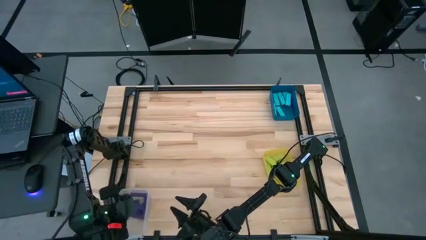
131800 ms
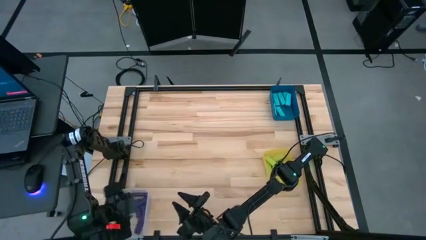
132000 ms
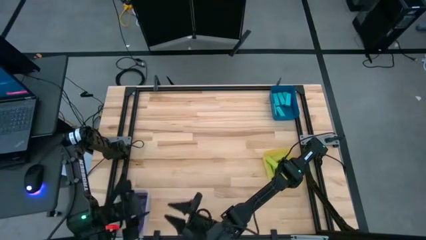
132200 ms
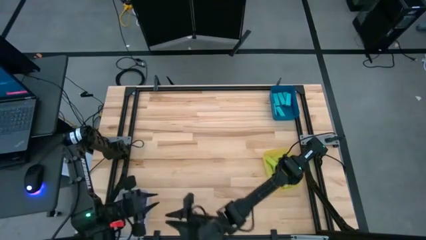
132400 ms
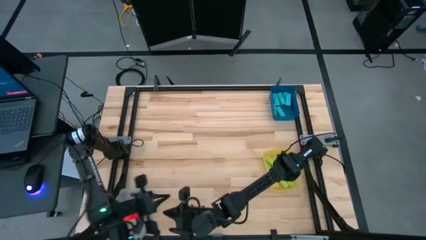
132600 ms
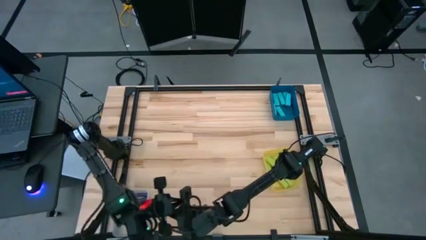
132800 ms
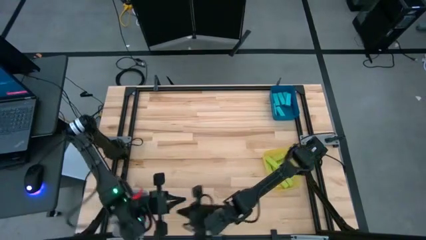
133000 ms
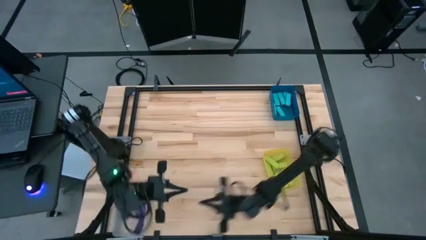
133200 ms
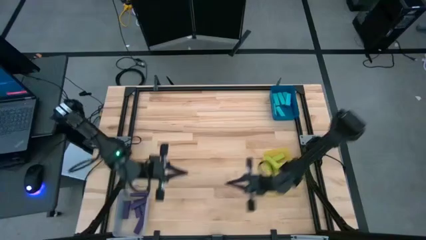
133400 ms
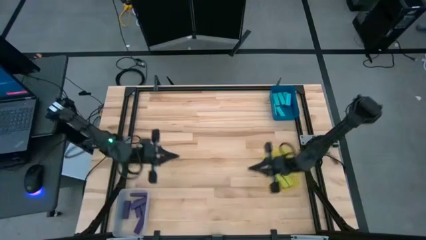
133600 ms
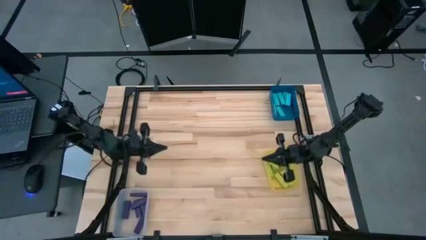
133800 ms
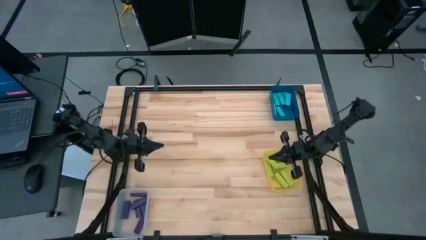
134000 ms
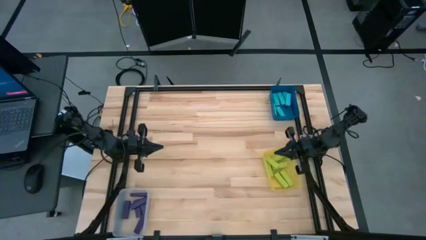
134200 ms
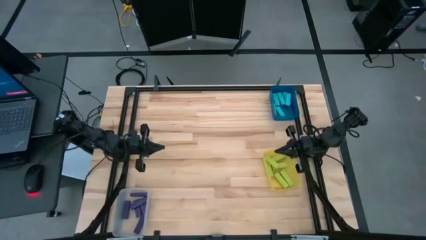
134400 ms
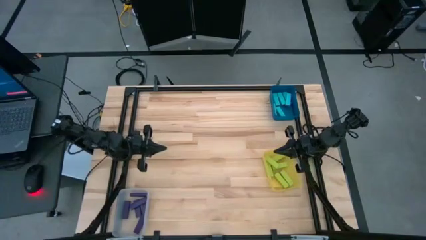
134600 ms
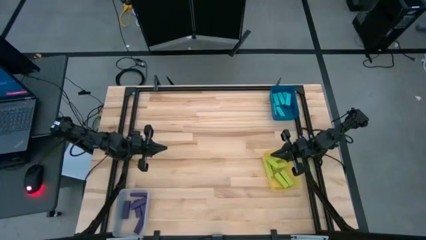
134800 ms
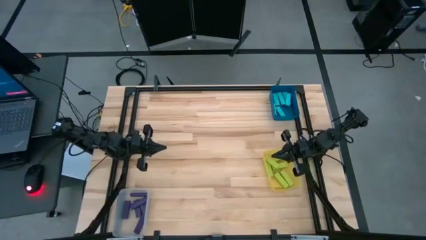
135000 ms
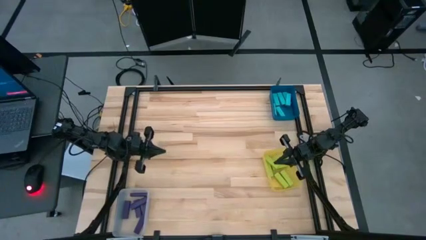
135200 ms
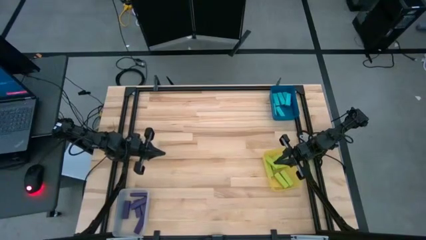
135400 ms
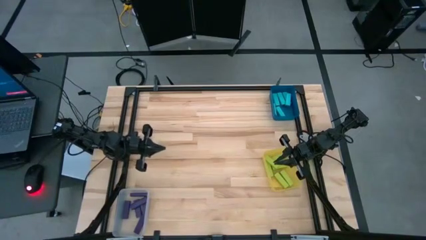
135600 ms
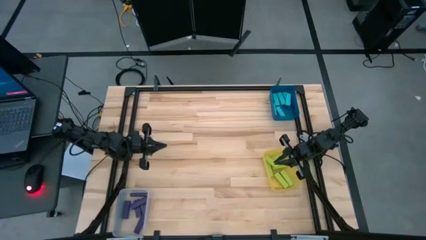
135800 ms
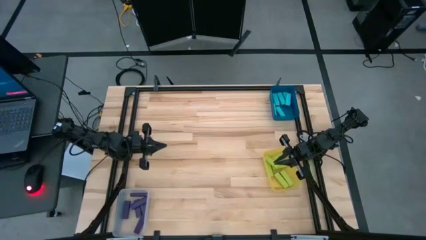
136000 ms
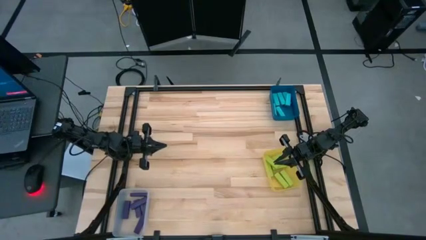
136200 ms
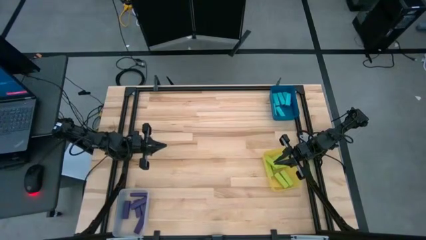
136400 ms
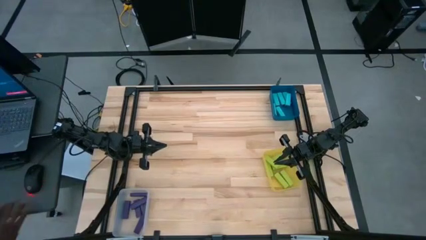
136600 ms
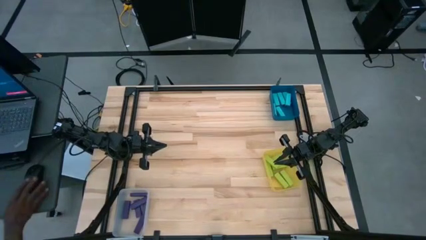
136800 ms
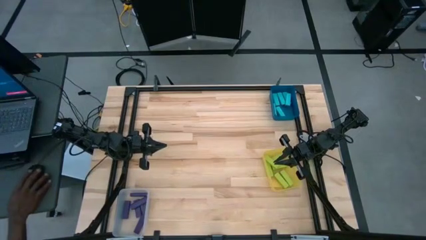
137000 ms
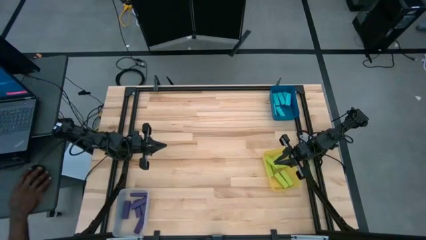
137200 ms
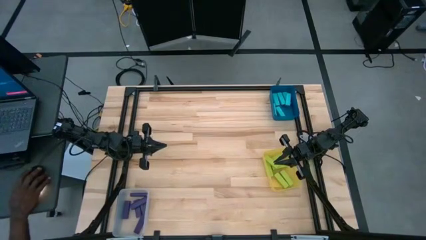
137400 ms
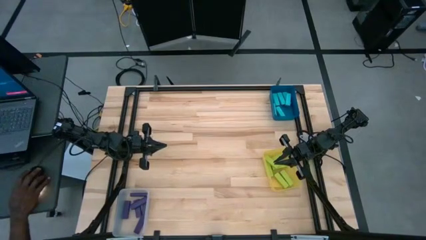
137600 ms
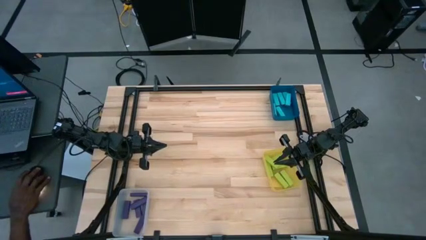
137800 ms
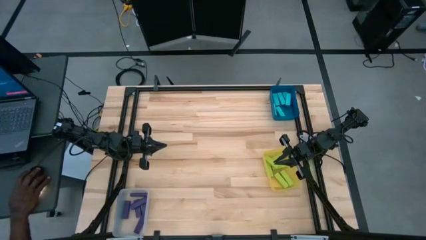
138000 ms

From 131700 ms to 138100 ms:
Task: Sort blocks
Return to Home Position

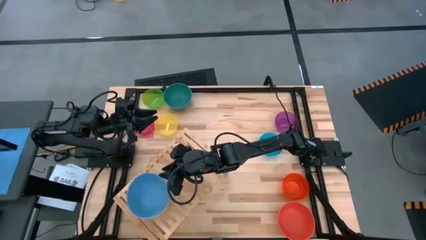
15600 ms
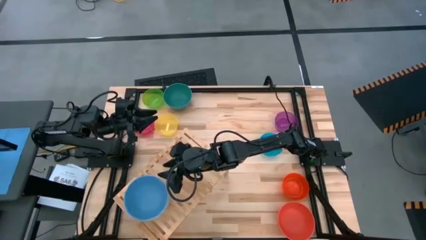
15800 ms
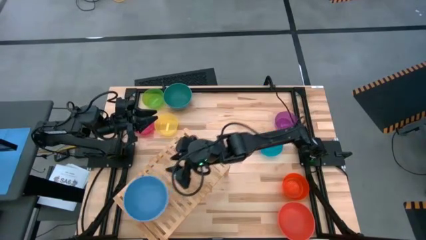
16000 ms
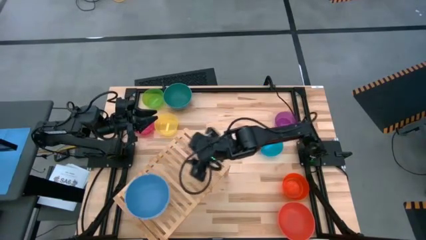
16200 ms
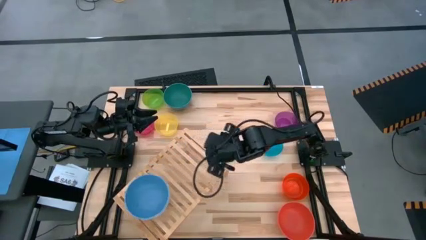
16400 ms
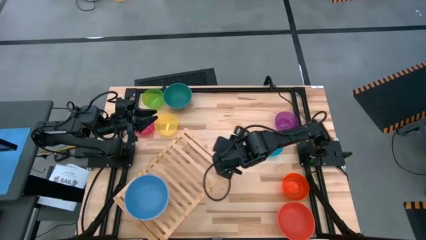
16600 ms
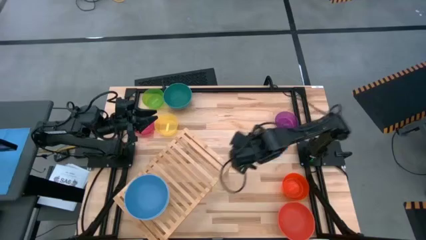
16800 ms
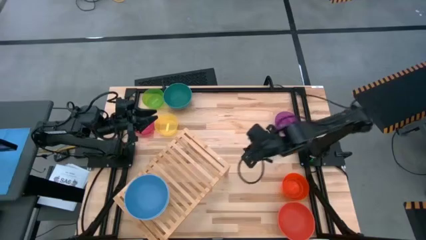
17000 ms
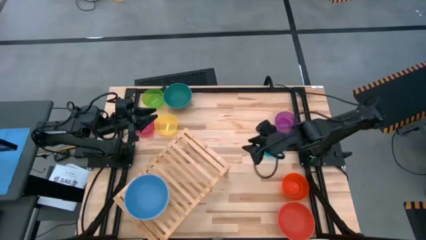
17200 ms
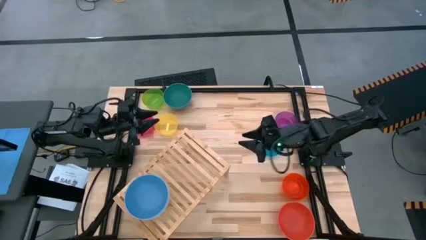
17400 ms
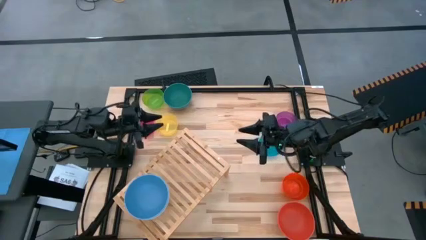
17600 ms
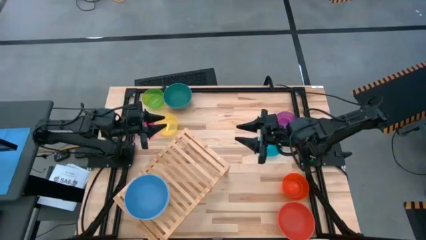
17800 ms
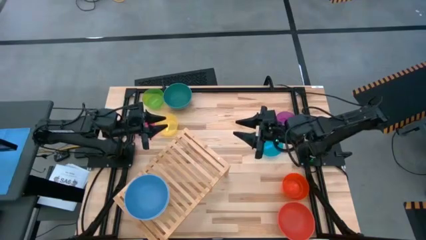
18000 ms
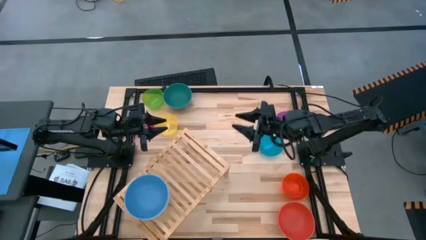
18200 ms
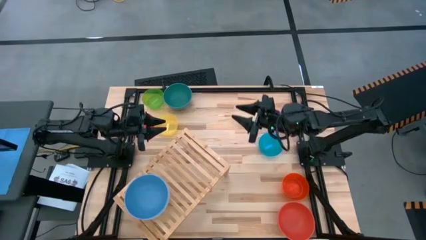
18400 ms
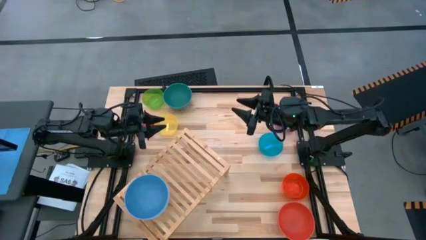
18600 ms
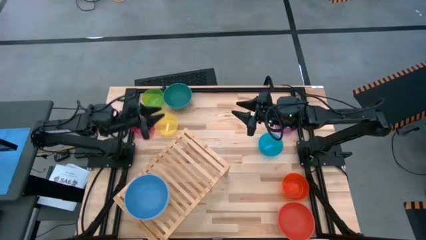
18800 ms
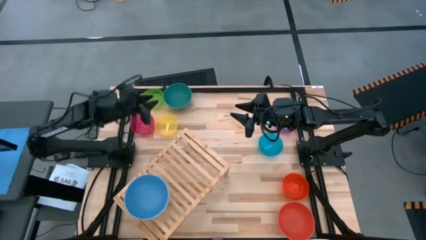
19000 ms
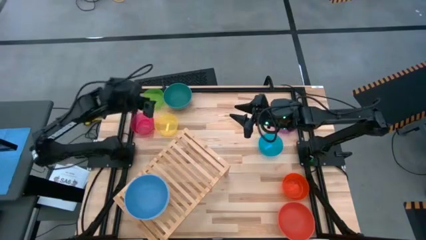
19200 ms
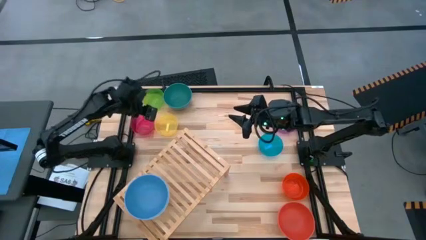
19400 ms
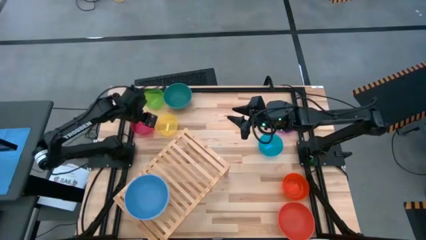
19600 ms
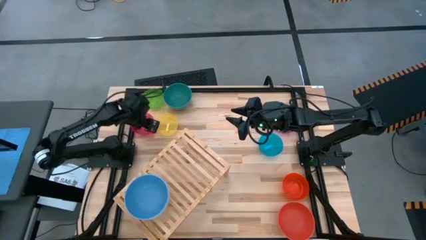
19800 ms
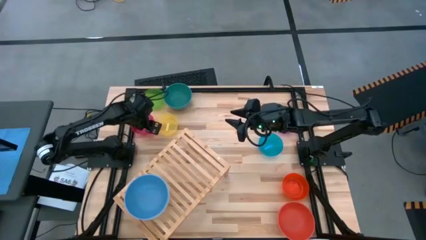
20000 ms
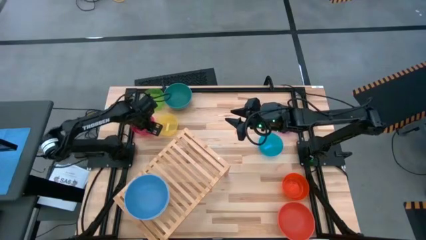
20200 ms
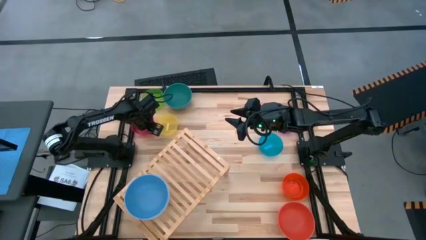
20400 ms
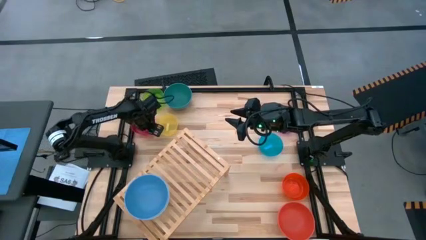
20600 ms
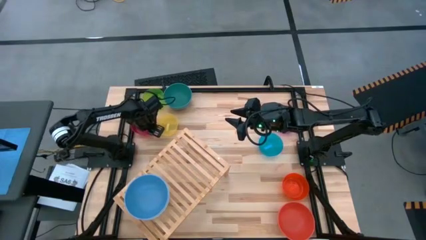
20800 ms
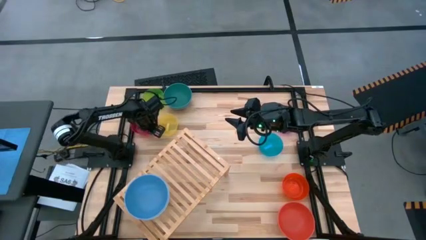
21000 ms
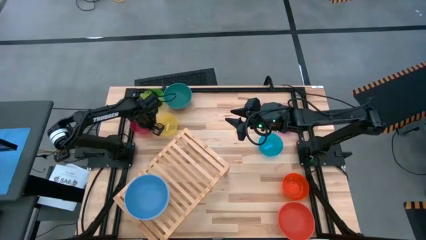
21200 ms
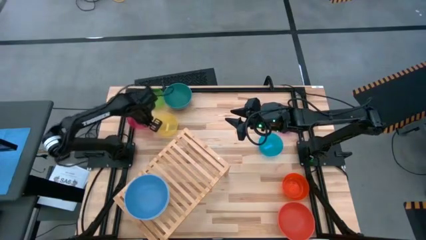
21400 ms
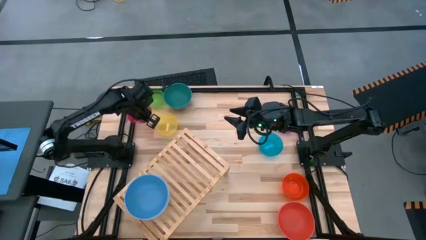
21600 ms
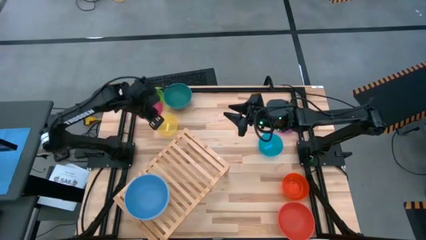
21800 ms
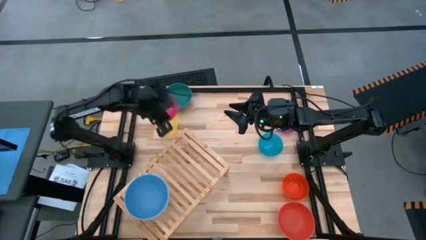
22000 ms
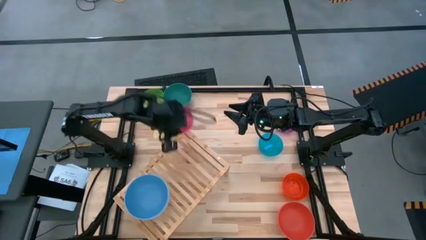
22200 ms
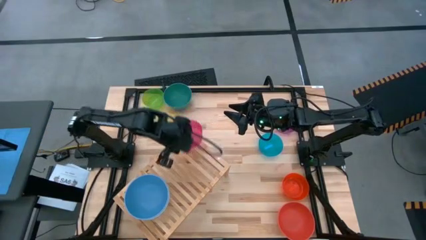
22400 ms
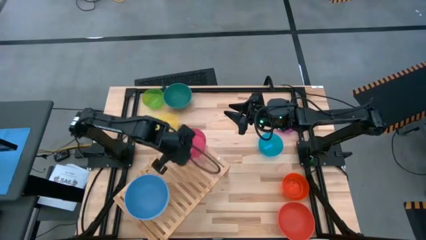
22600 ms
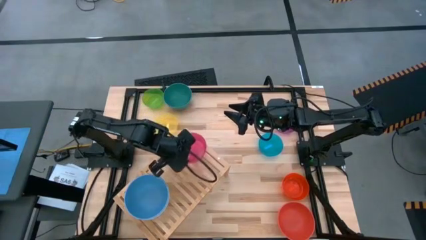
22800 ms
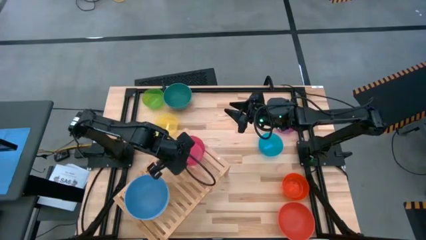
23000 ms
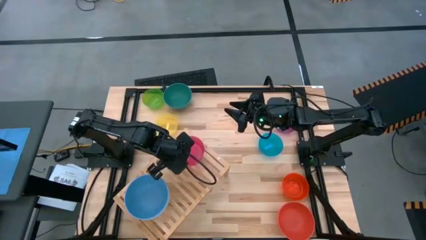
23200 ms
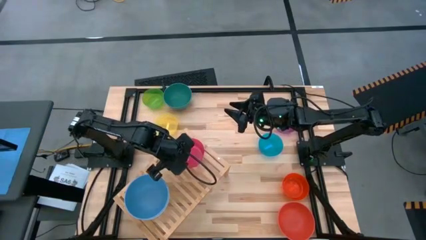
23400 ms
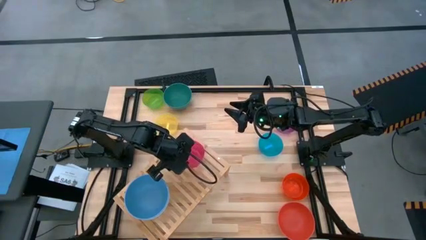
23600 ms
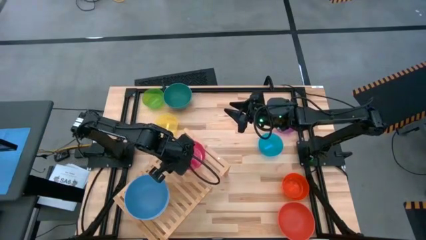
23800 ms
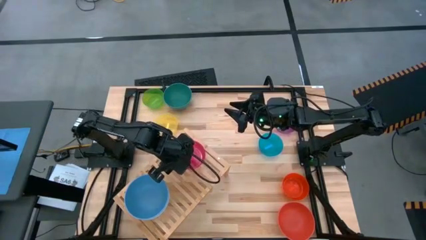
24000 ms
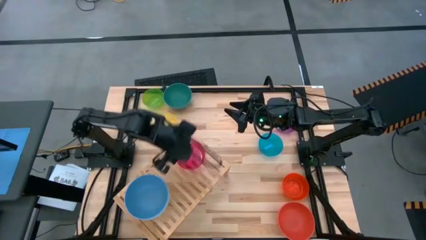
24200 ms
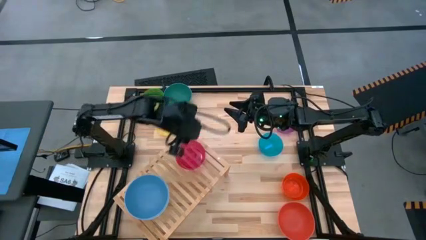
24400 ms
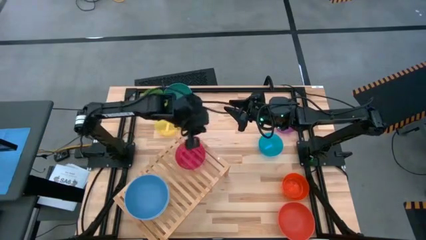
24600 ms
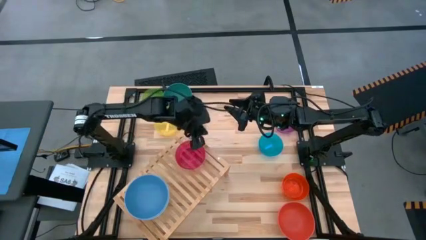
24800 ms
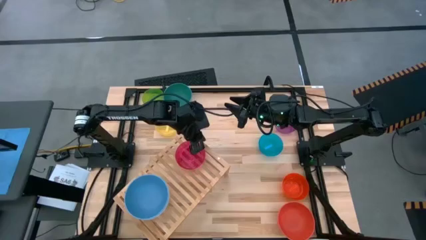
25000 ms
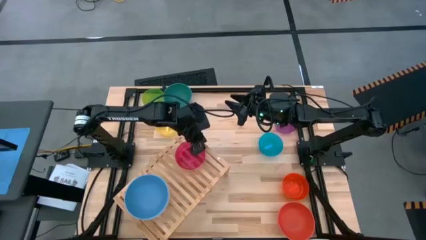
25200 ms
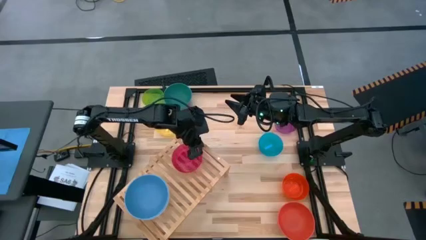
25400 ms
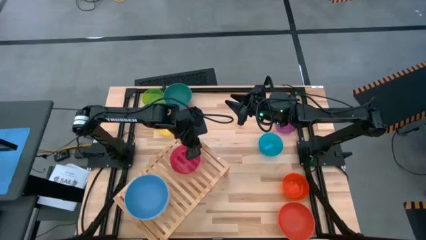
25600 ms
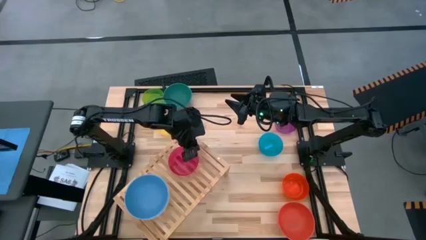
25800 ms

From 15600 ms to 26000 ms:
Task: Place and stack bowls onto a shelf
Put the small red bowl on the shelf
